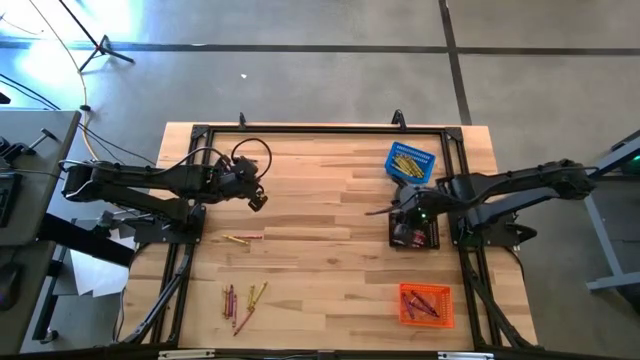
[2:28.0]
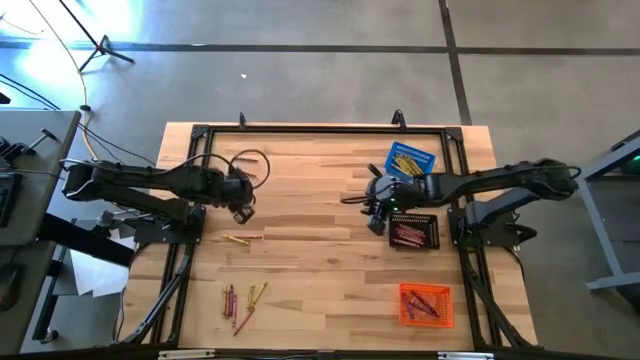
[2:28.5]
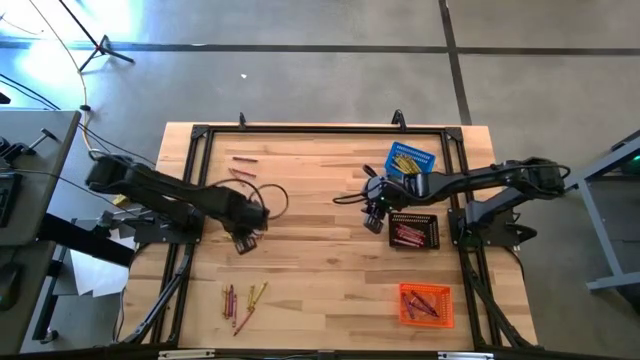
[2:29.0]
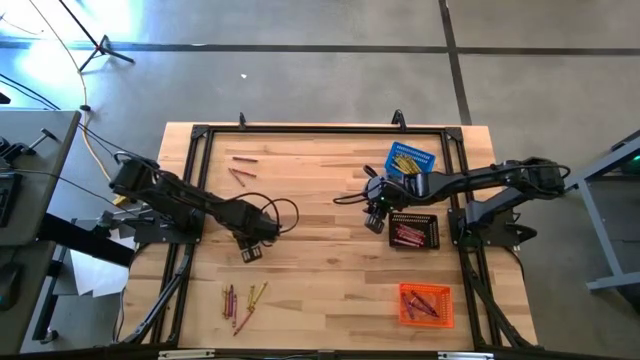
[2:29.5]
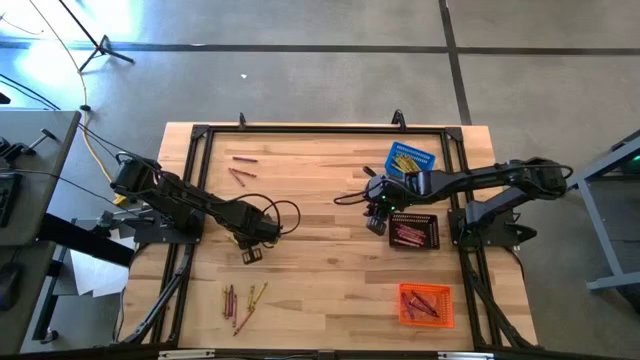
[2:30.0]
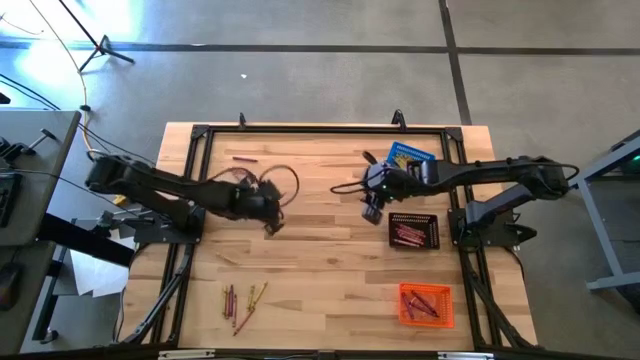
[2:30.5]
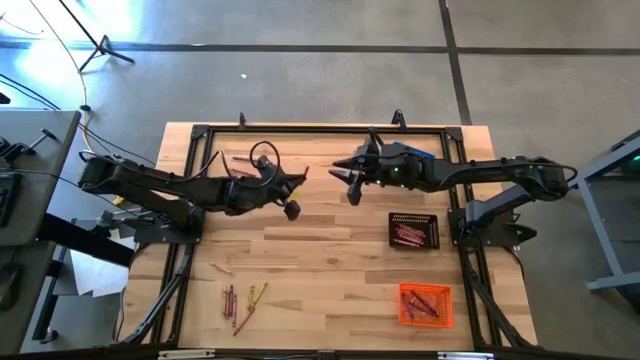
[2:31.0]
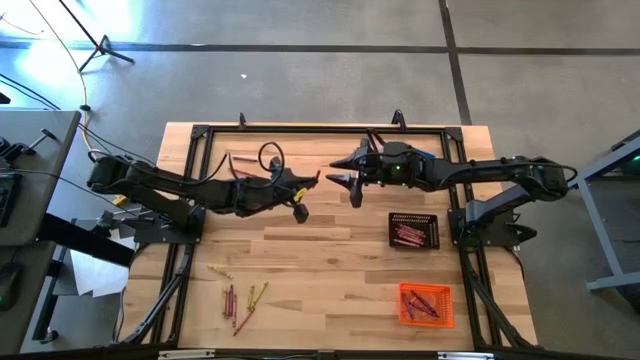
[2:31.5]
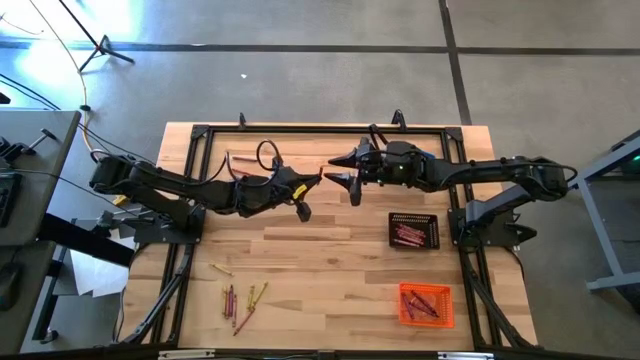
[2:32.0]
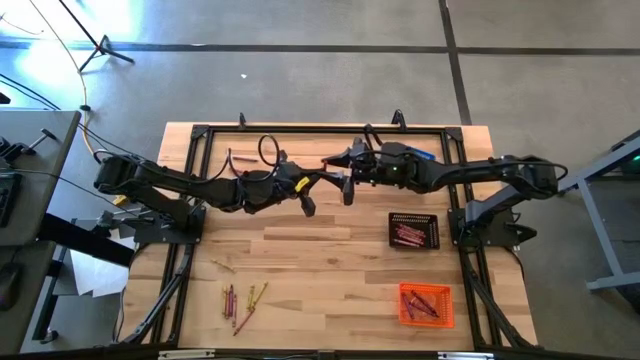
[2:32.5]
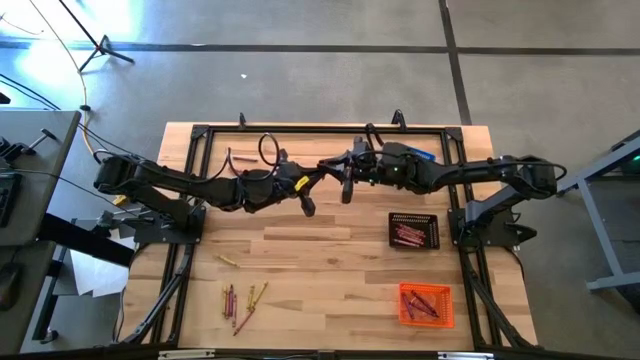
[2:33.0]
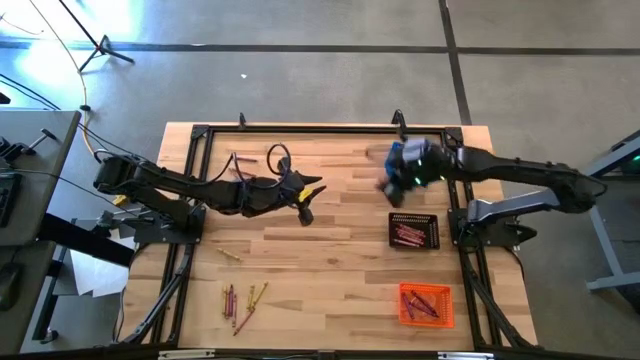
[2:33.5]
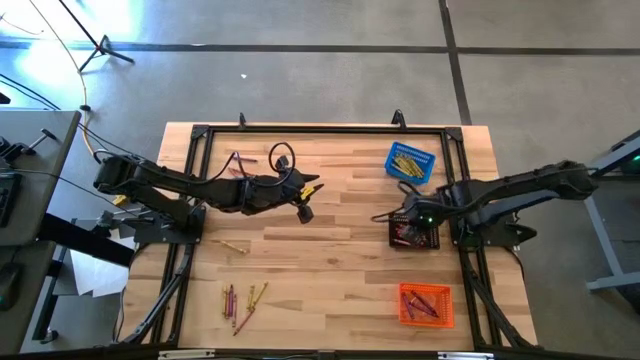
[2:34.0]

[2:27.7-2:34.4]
Task: Sort crayons
Put the red crayon into the black bin

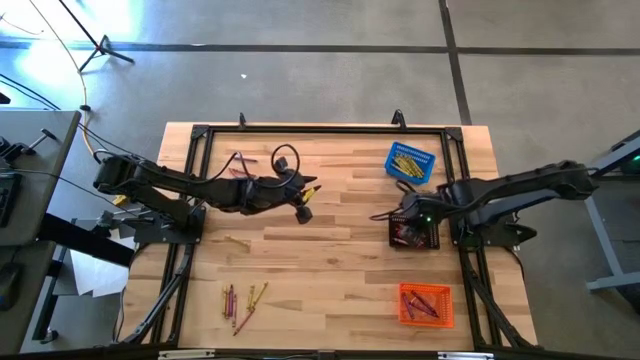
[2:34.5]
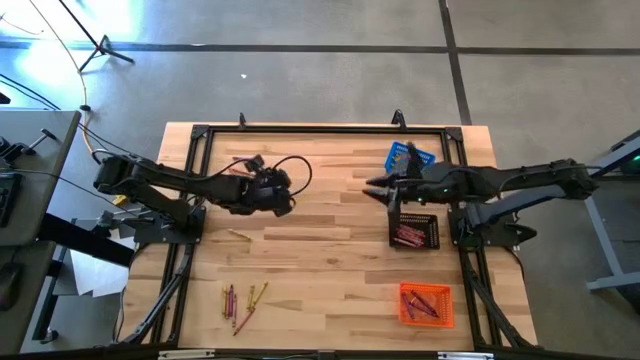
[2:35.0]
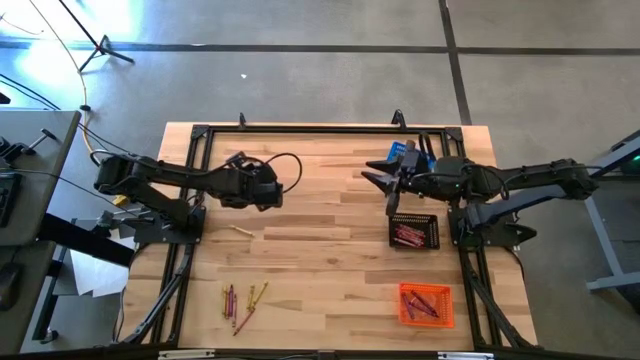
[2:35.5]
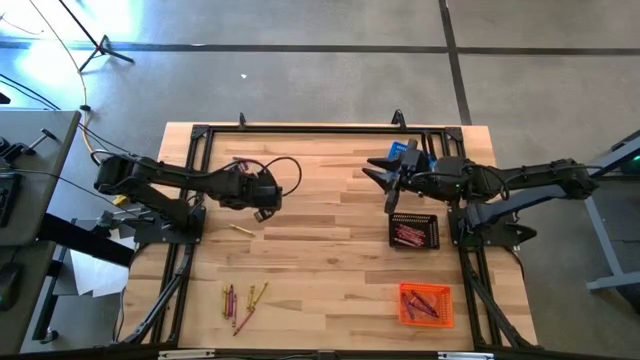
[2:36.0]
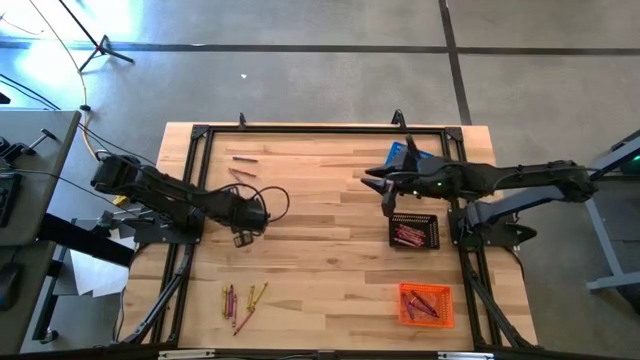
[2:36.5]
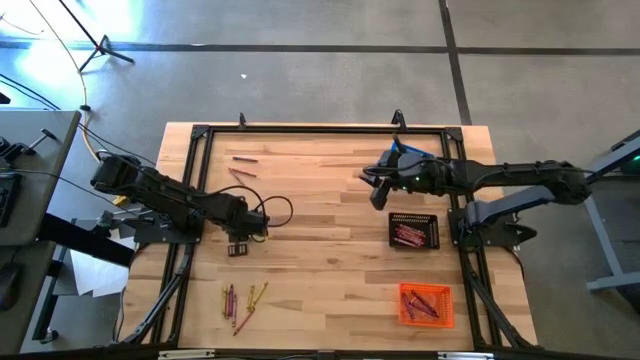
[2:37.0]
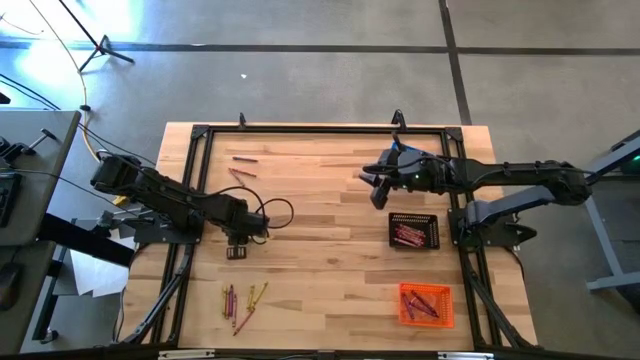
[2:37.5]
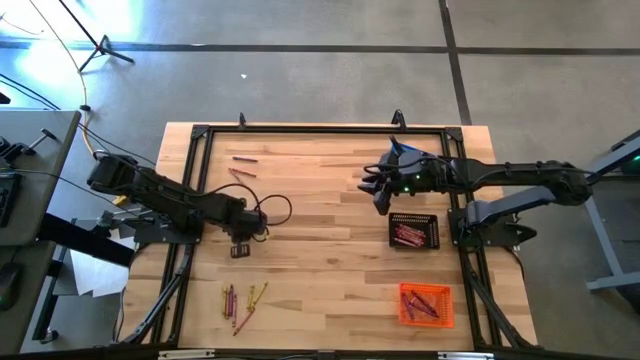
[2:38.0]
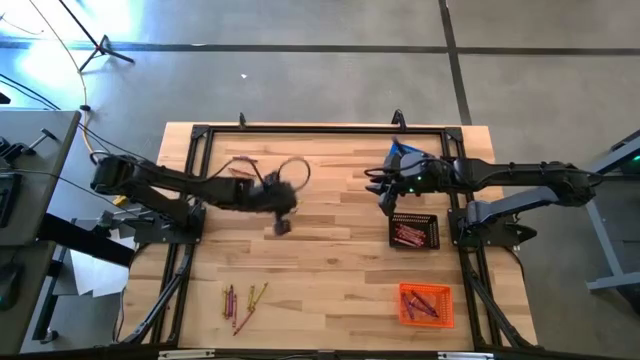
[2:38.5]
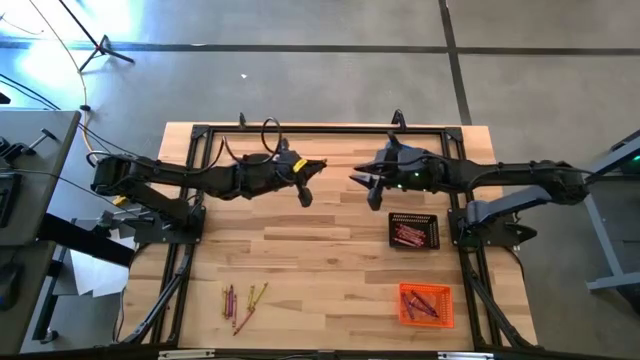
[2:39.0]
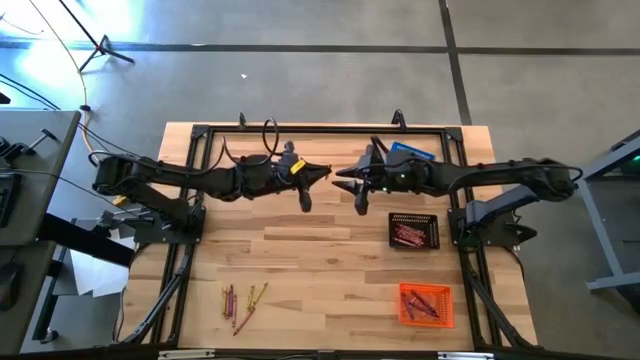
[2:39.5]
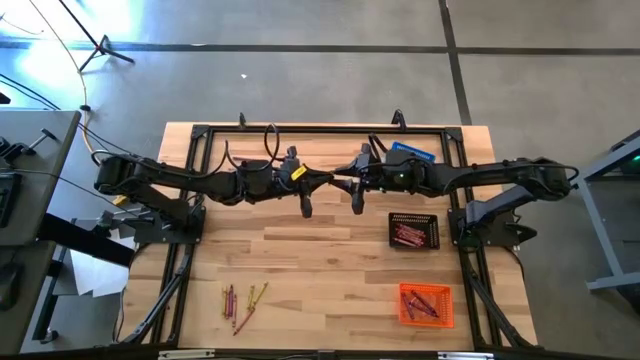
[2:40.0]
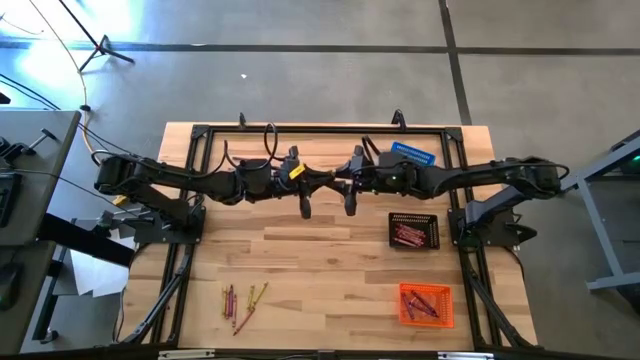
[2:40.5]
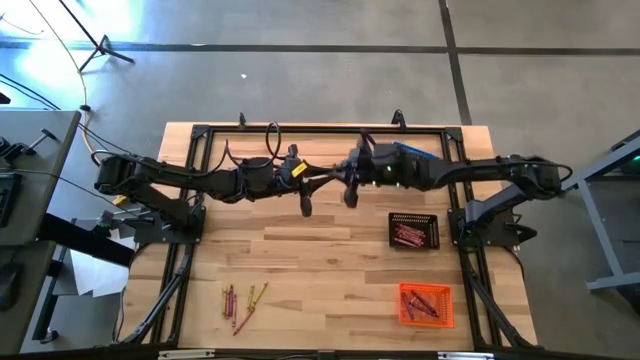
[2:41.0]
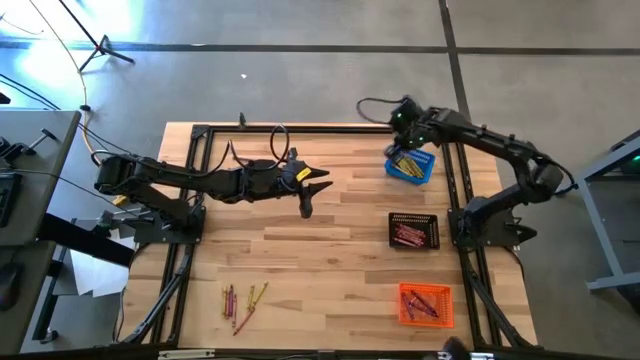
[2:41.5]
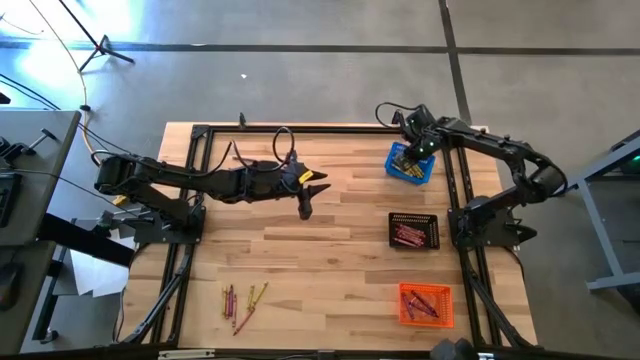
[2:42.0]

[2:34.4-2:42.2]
Put the yellow crayon into the blue bin

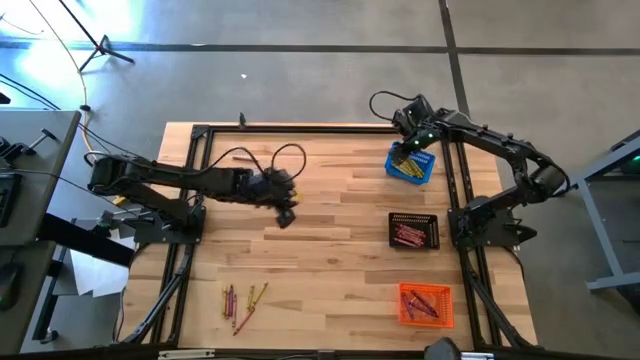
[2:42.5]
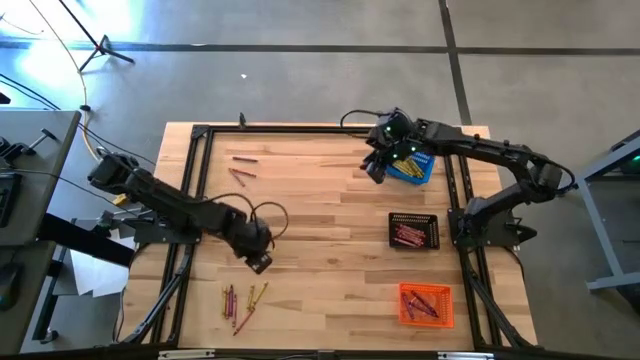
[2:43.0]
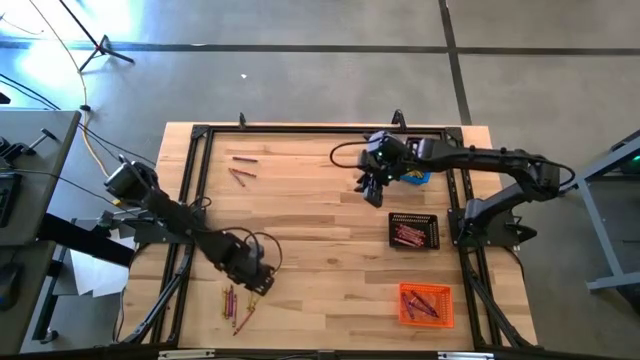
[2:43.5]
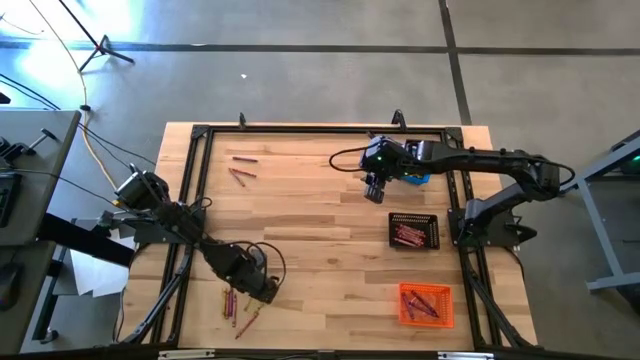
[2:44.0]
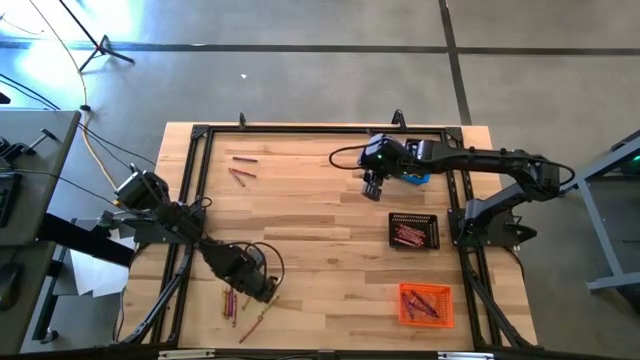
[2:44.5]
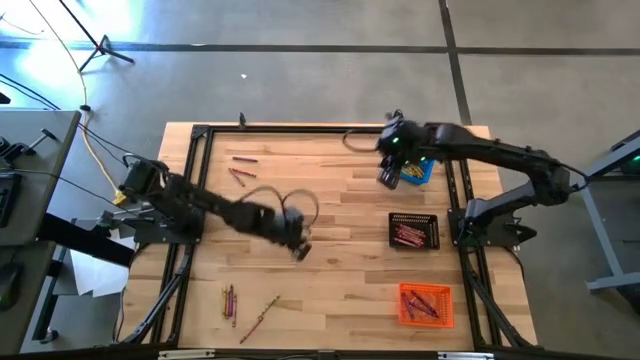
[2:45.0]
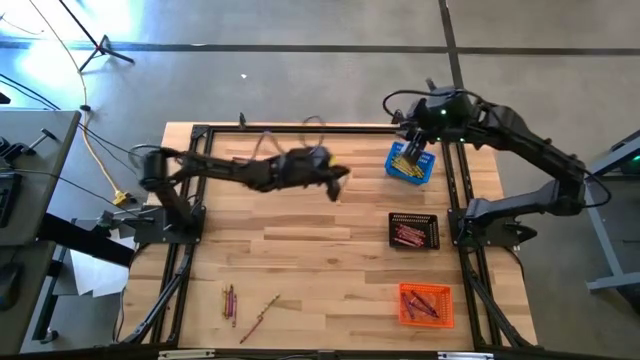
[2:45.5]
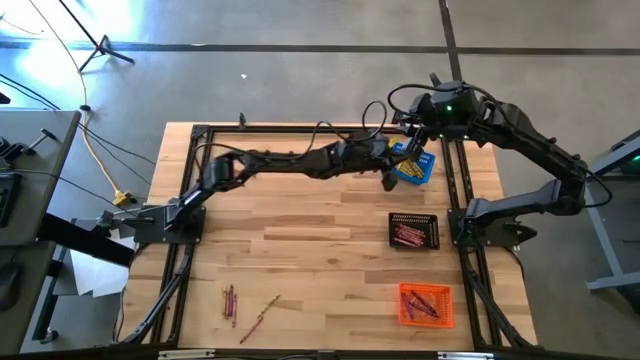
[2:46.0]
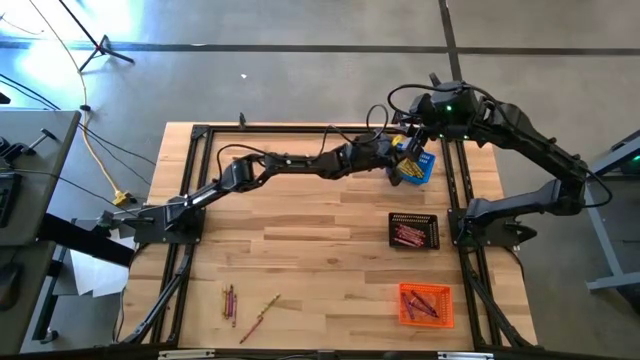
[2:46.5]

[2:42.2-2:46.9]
Put the yellow crayon into the blue bin

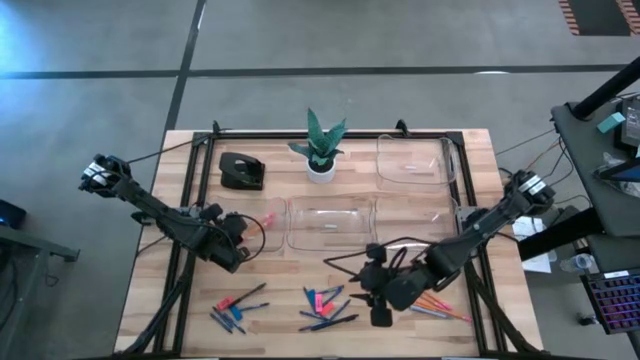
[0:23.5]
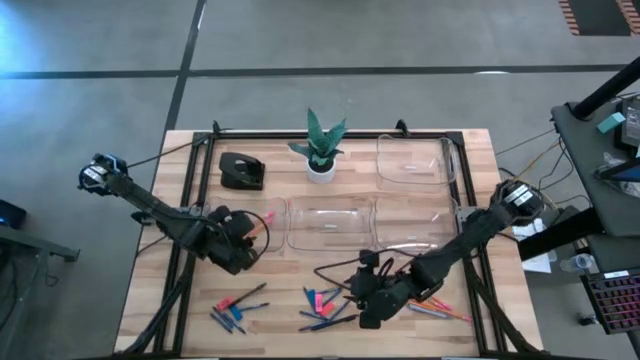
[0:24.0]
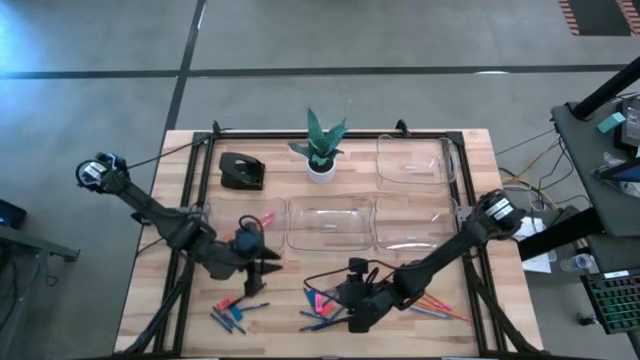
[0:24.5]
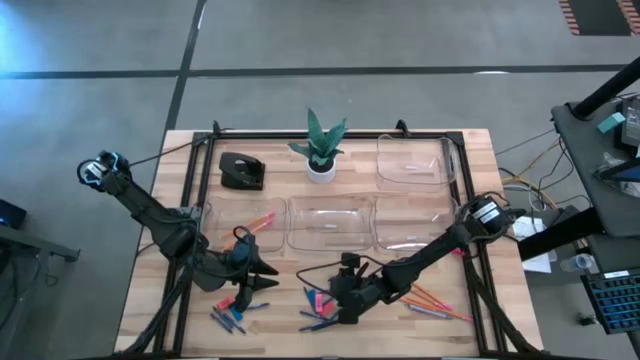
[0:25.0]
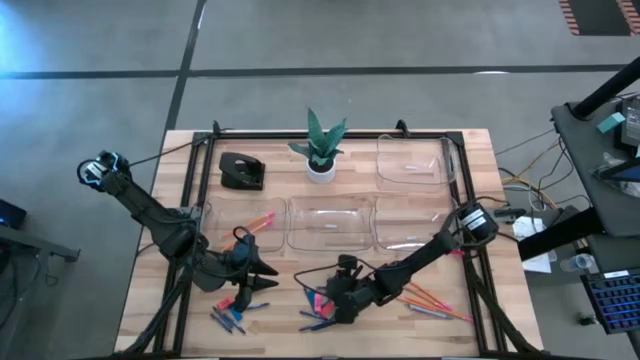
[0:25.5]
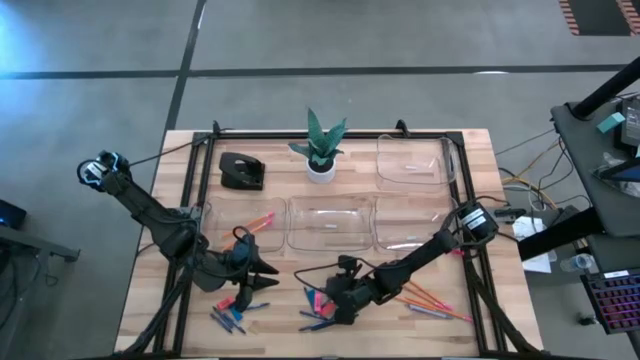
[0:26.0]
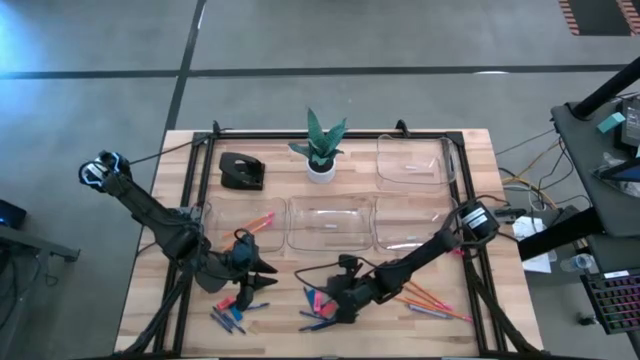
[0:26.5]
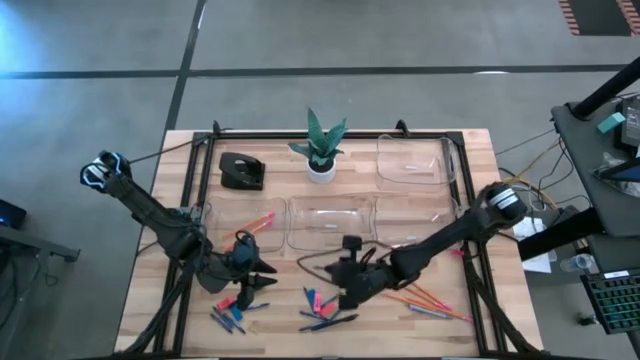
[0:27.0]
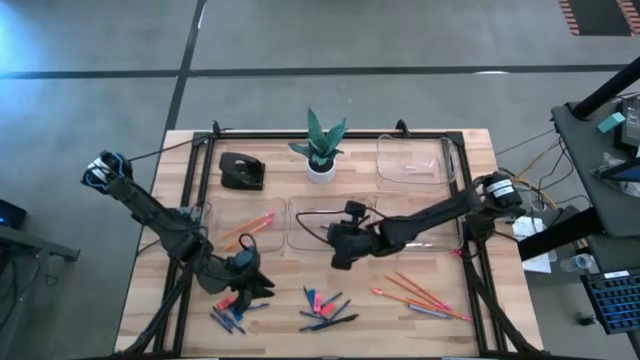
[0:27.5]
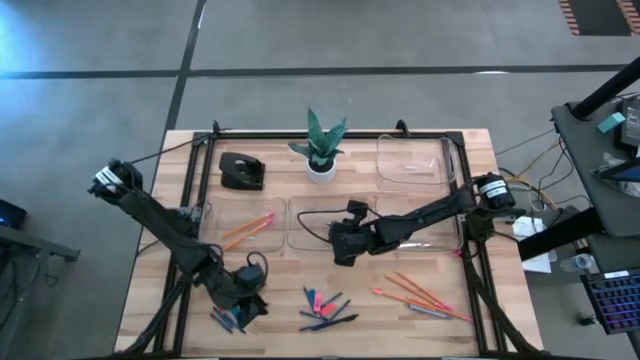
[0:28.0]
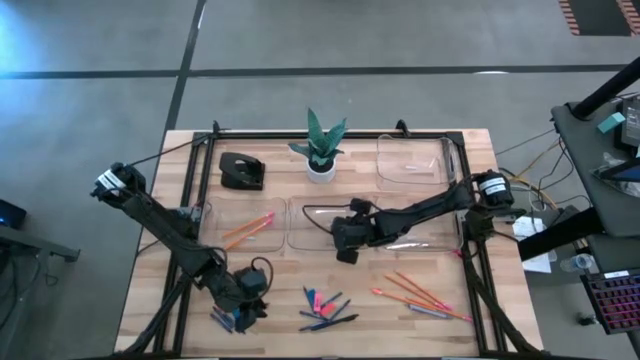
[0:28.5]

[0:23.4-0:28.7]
Task: Sort crayons/erasers/pens/pencils in bins
Put the blue crayon into the middle transparent bin
